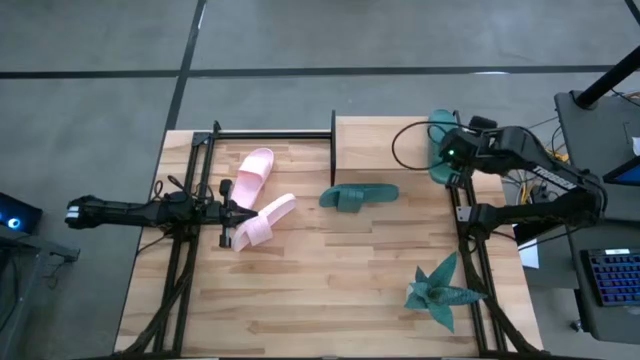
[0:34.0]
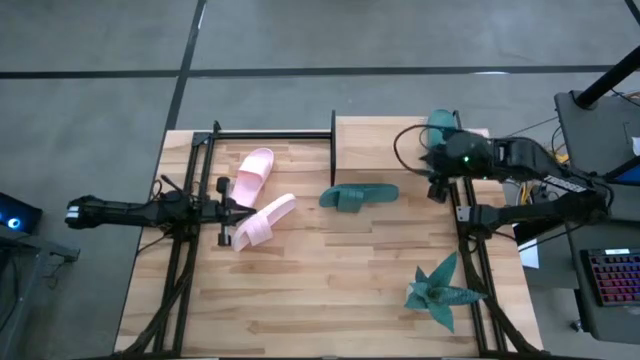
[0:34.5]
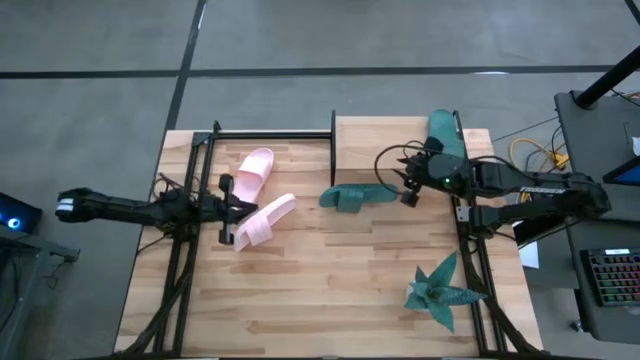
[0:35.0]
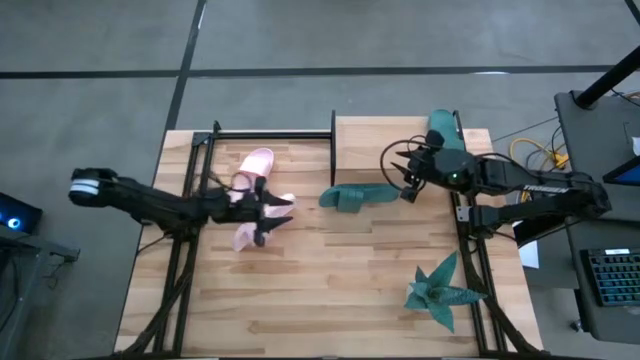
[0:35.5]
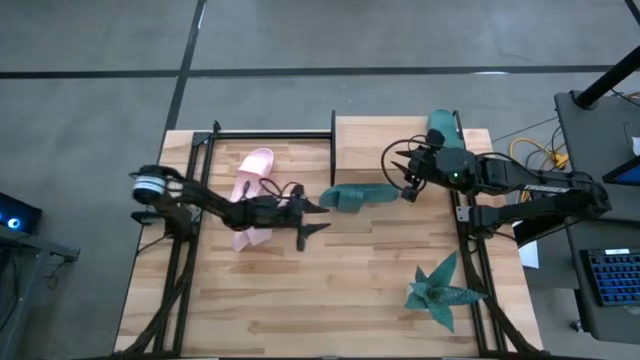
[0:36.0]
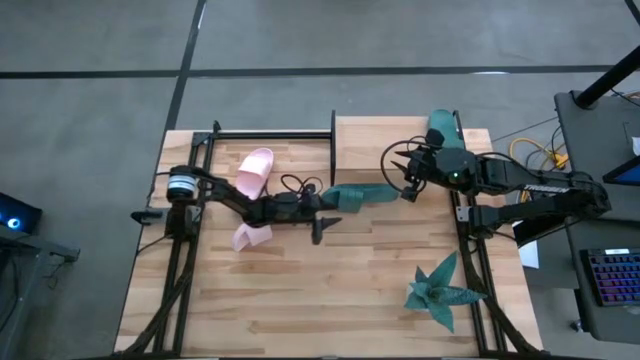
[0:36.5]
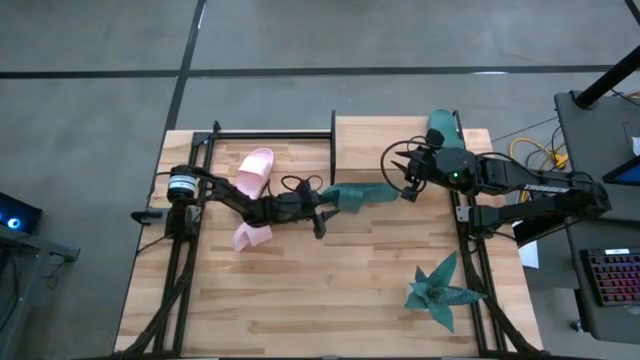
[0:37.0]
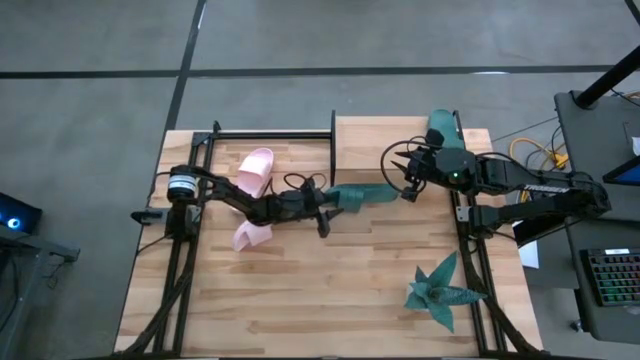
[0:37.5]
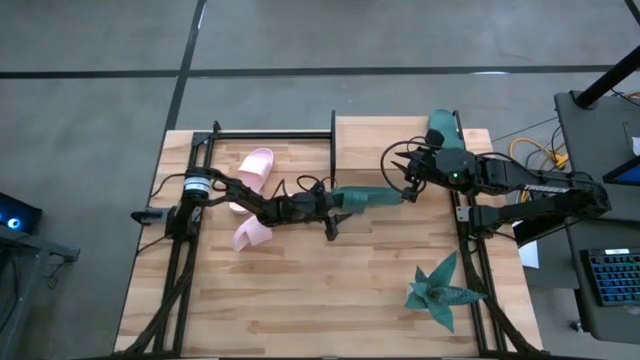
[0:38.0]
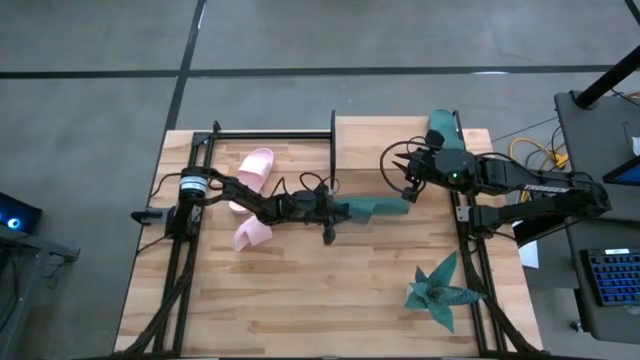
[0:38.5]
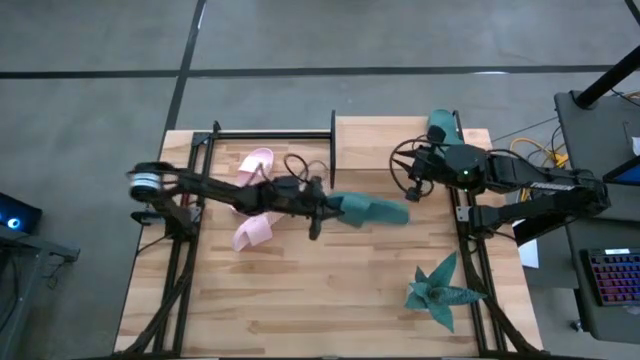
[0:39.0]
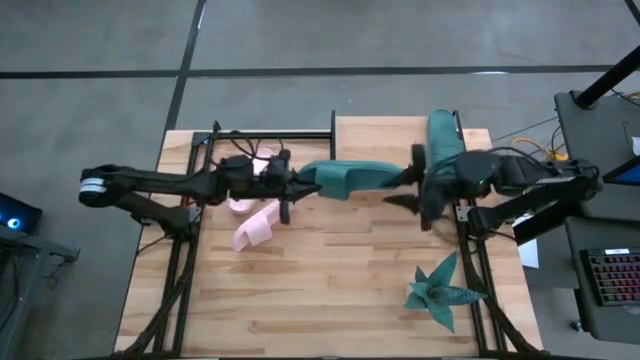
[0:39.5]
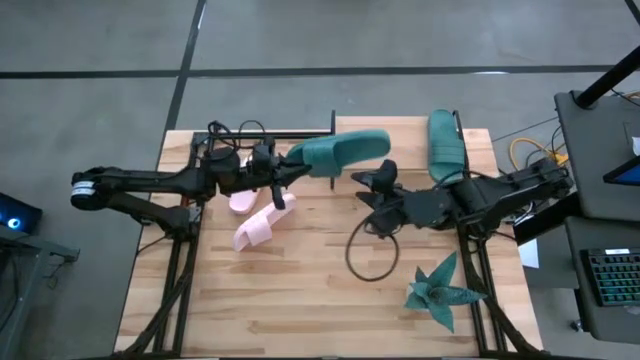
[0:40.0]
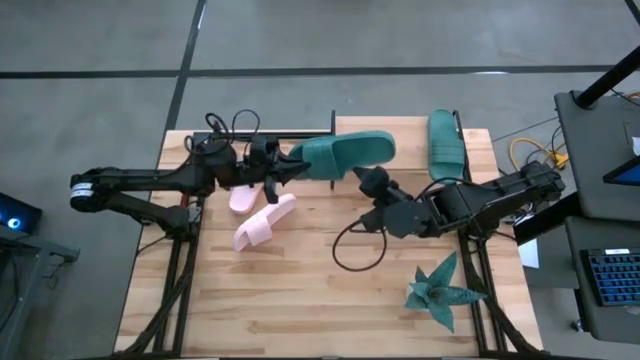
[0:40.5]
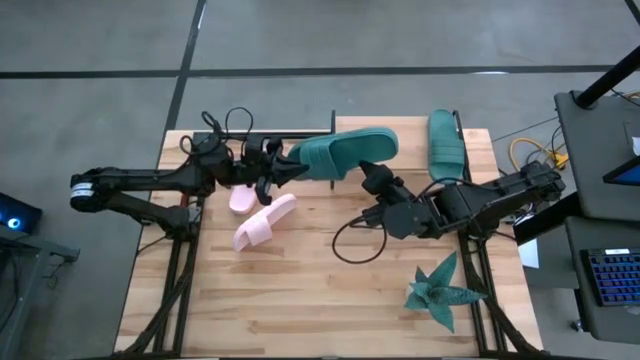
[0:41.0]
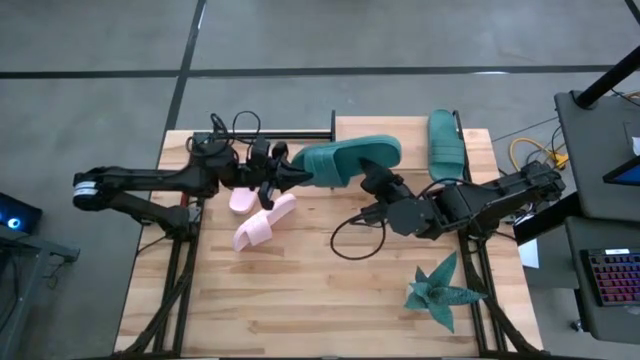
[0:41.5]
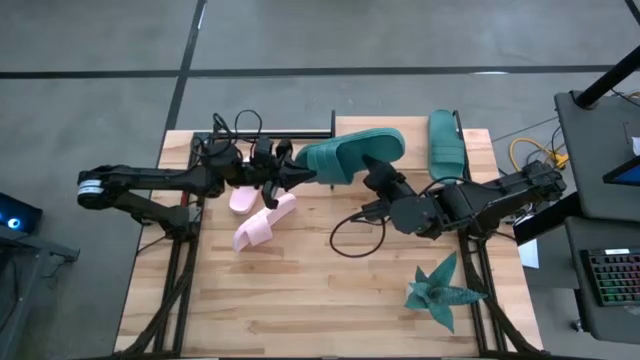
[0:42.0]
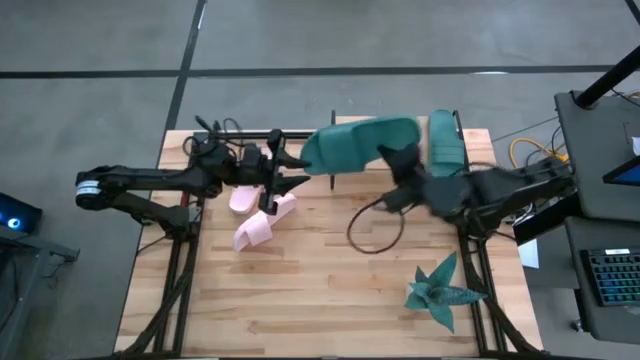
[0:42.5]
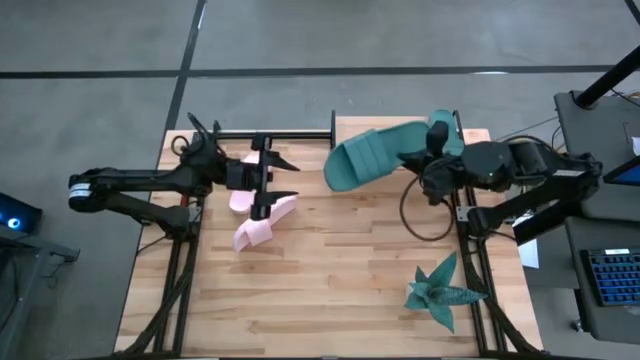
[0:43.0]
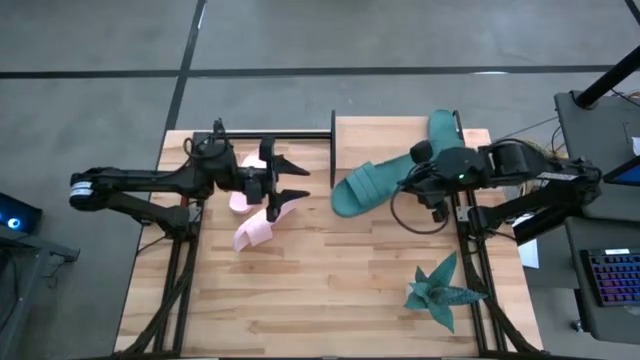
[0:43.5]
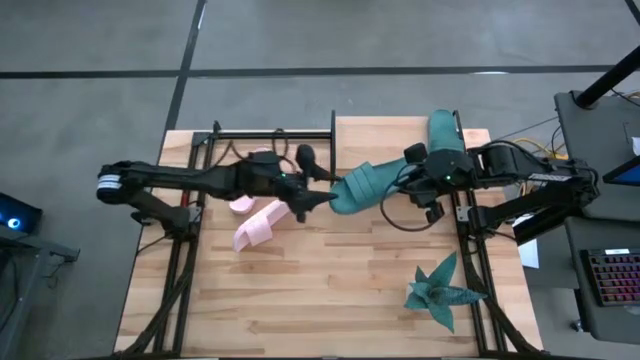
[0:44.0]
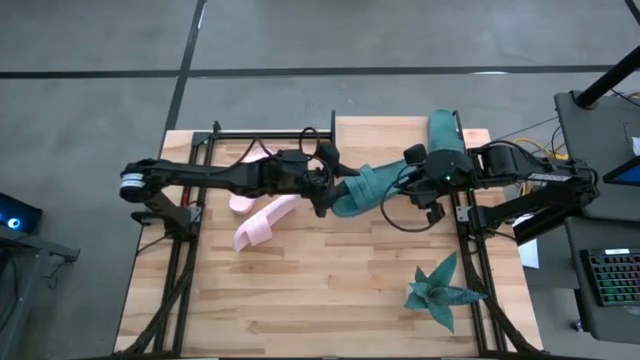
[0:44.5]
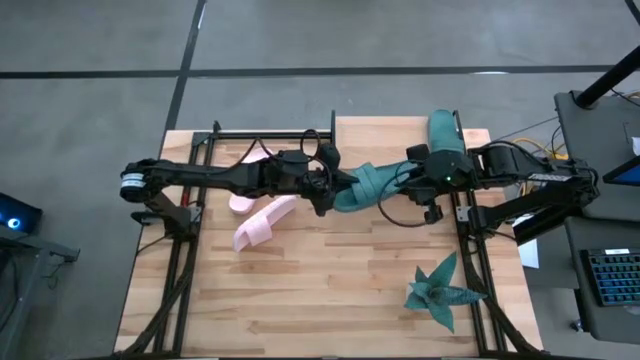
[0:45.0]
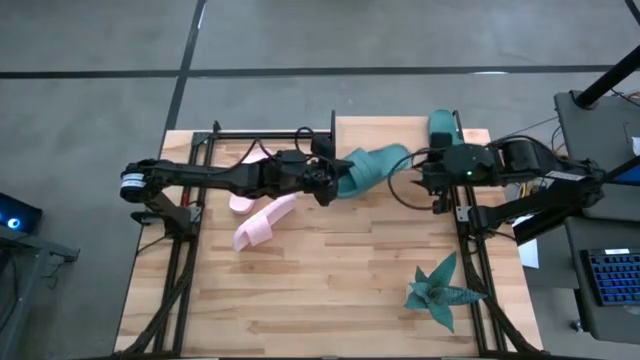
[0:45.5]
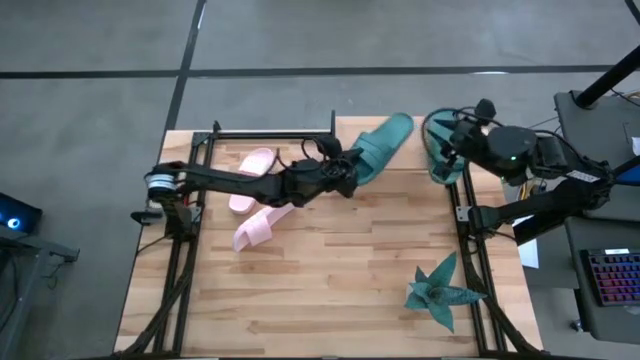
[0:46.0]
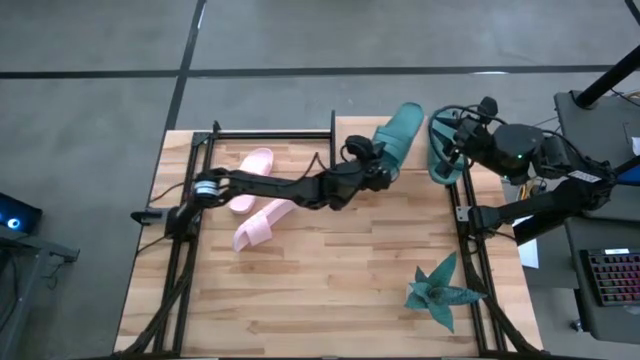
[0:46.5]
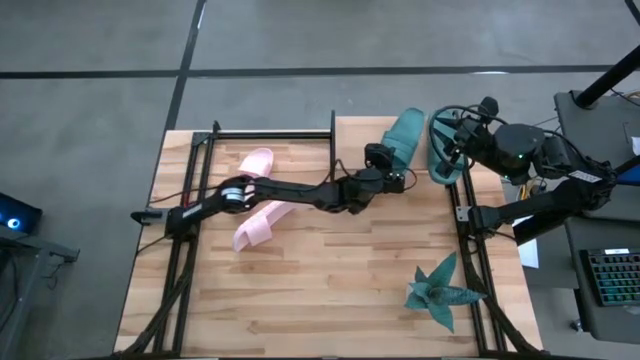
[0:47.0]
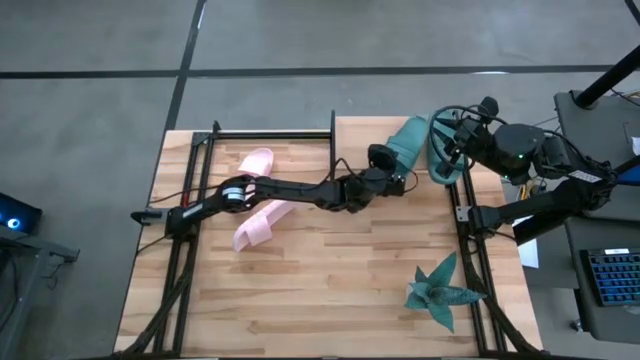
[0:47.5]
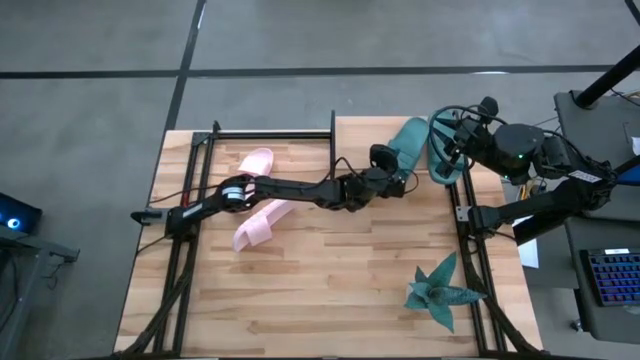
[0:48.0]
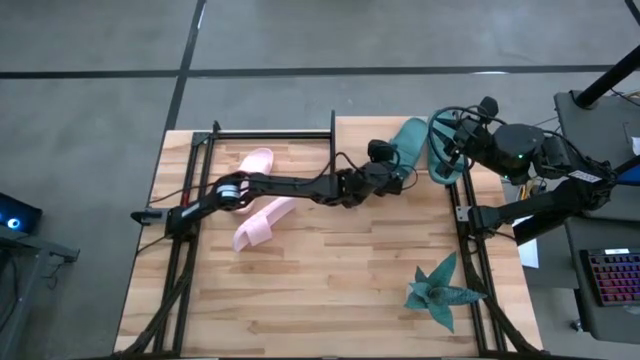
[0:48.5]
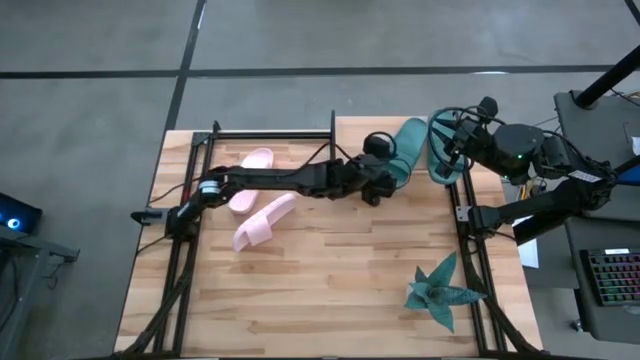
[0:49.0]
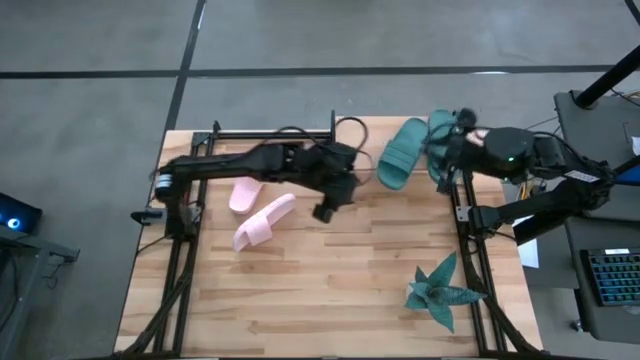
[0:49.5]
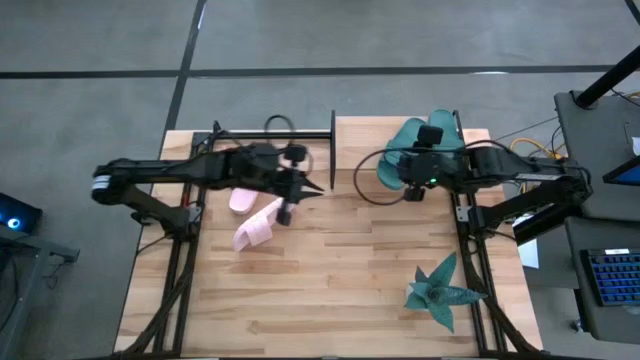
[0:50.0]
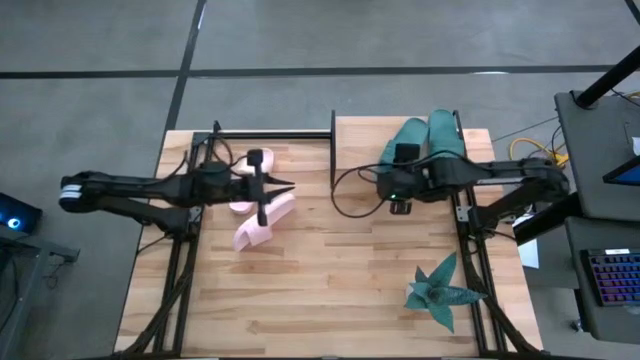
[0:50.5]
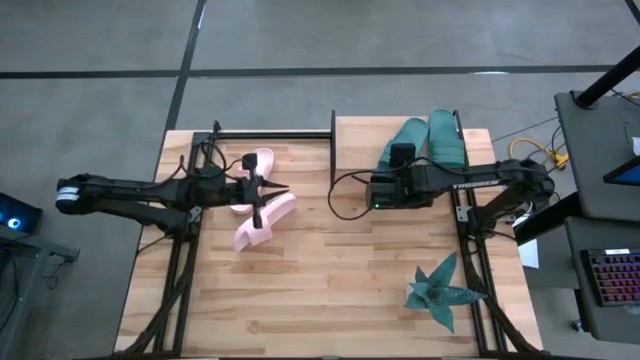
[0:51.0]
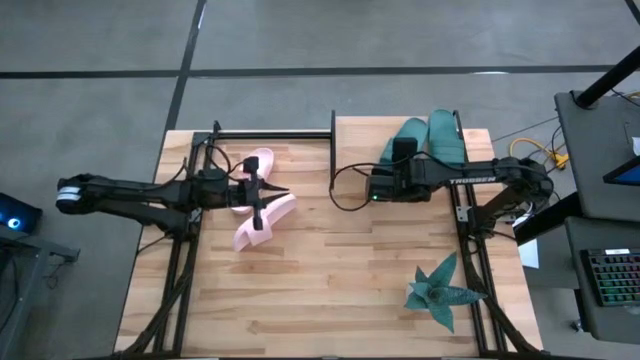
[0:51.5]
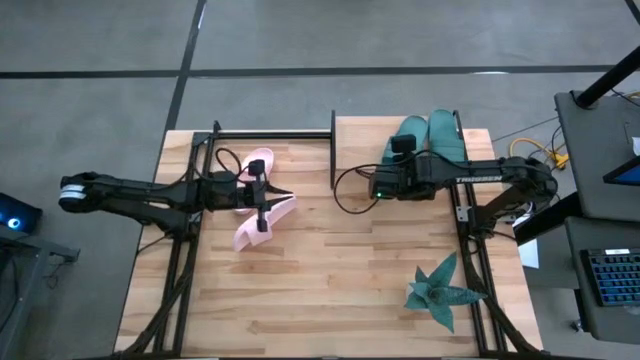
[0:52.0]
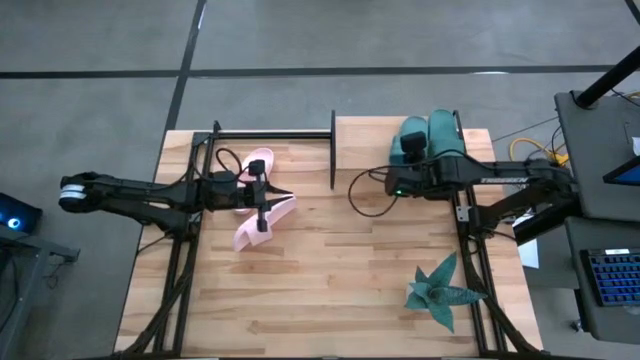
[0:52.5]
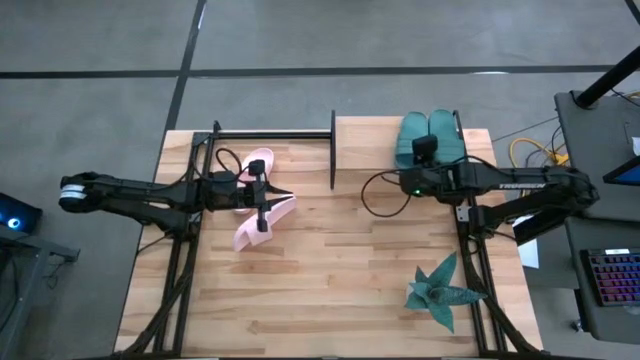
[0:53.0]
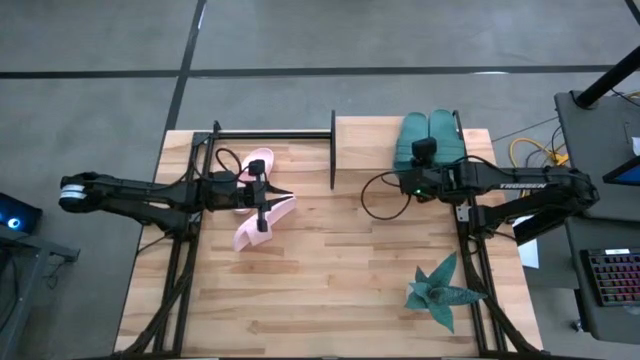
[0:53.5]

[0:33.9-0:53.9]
Task: Pick and place slides into the shelf
Put the green slide on the shelf

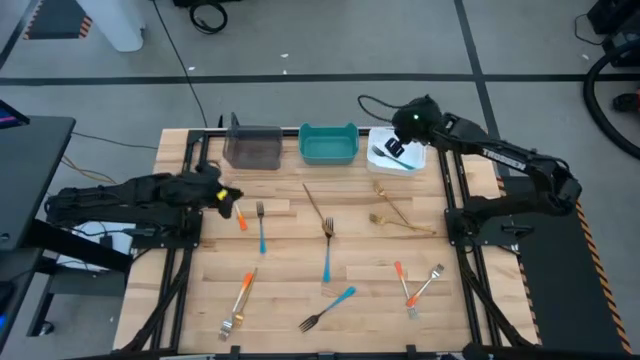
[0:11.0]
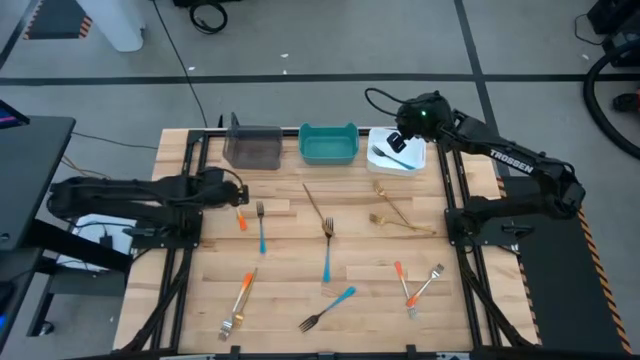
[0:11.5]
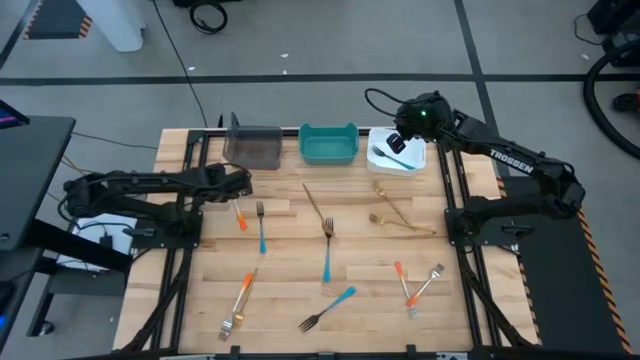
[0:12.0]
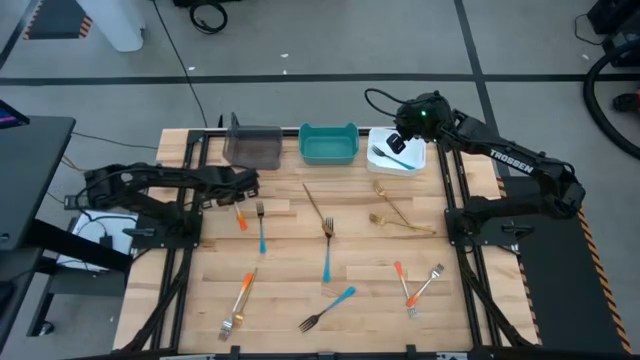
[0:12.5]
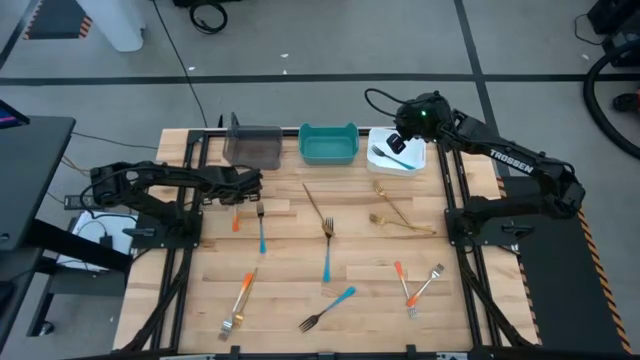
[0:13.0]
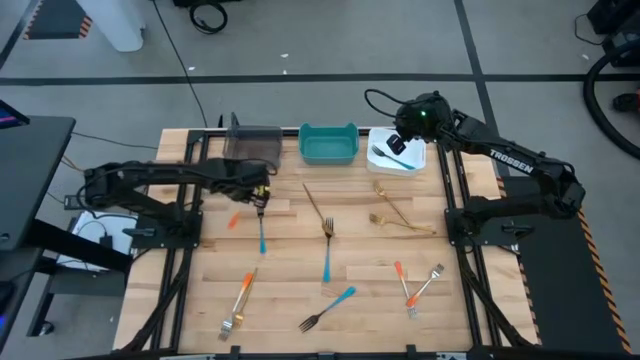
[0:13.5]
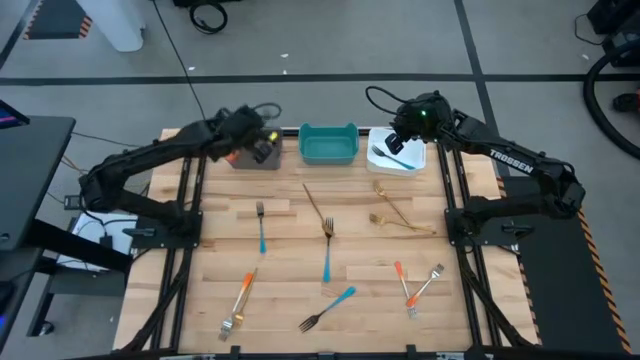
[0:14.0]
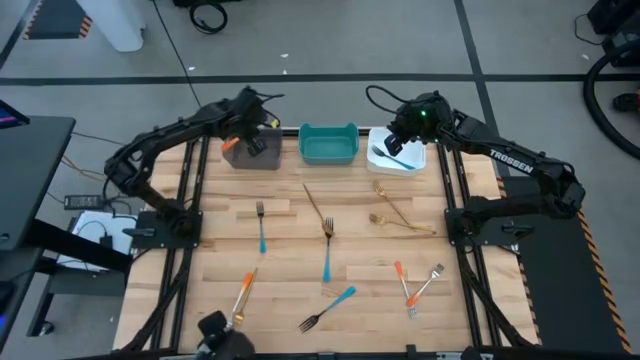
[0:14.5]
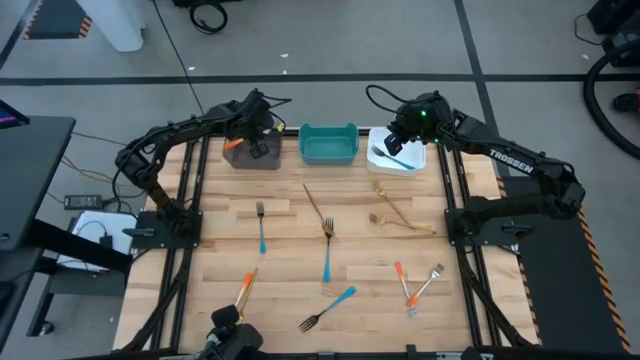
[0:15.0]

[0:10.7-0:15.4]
Task: Sort silverware by color (type)
Put the top left orange fork into the black transparent bin
